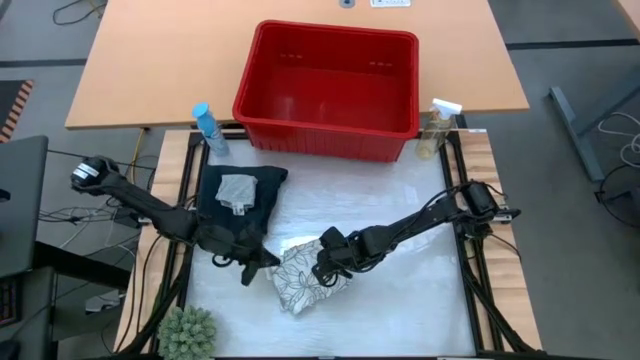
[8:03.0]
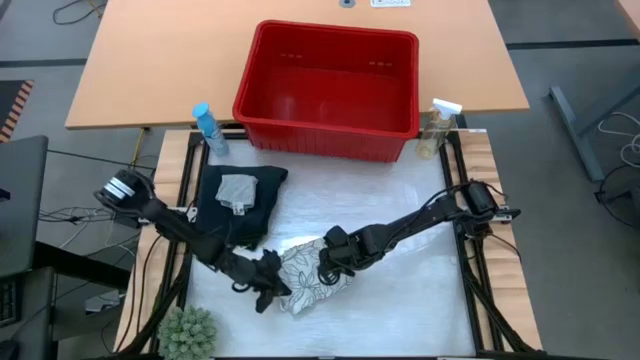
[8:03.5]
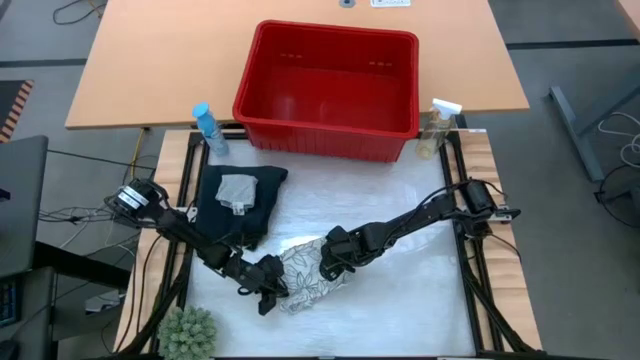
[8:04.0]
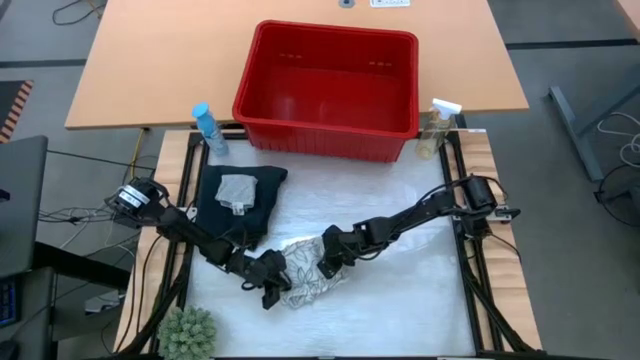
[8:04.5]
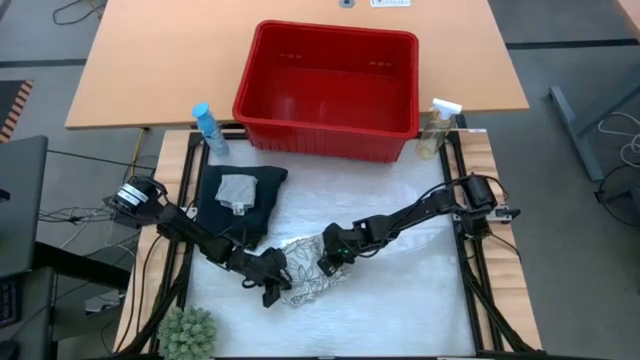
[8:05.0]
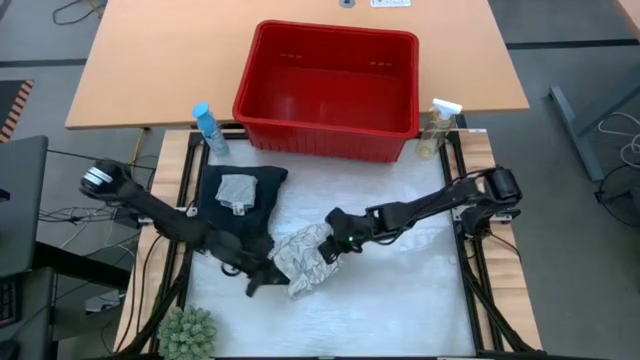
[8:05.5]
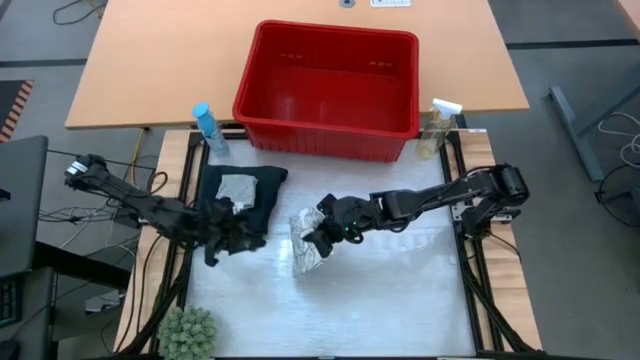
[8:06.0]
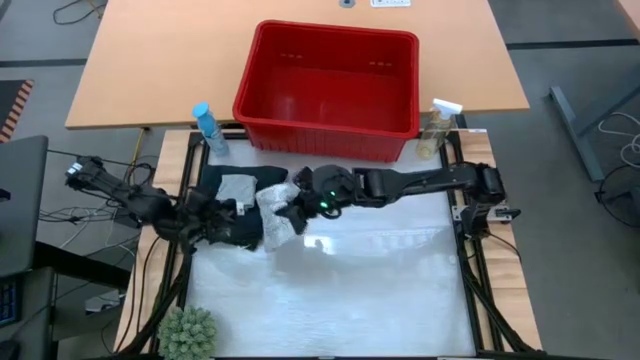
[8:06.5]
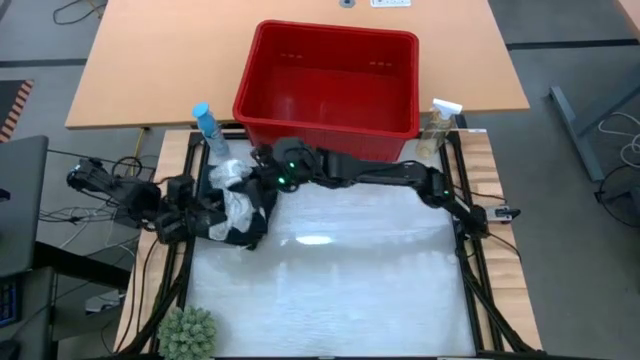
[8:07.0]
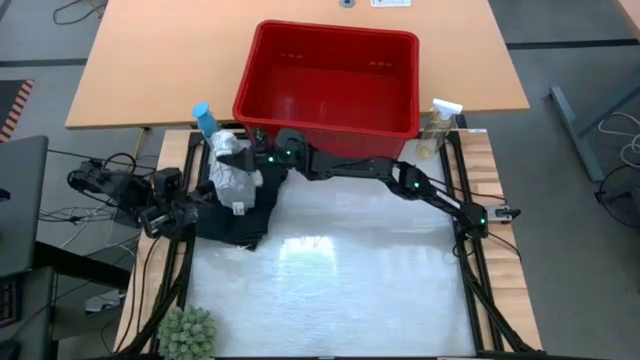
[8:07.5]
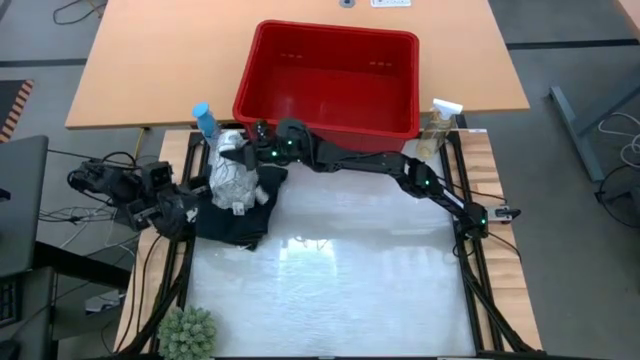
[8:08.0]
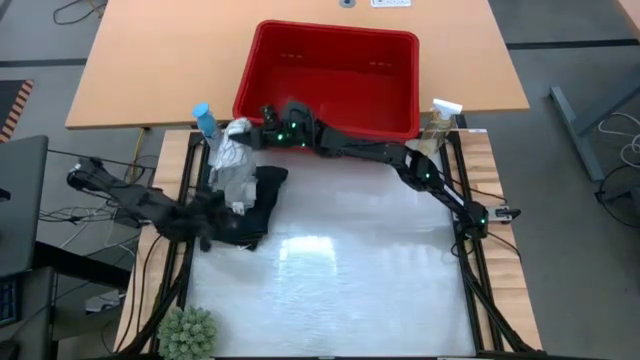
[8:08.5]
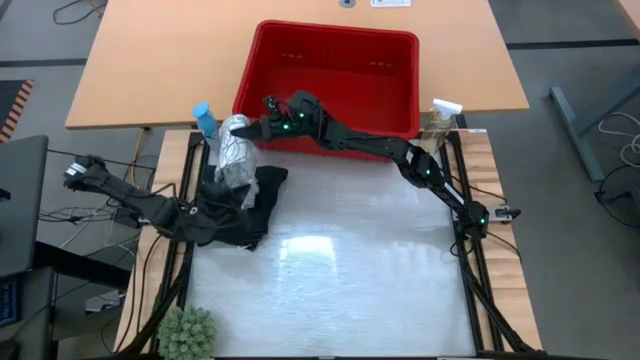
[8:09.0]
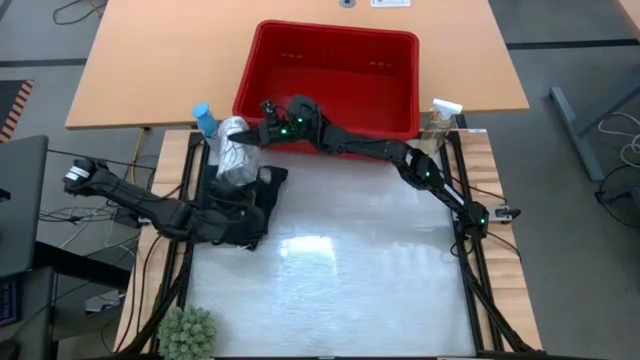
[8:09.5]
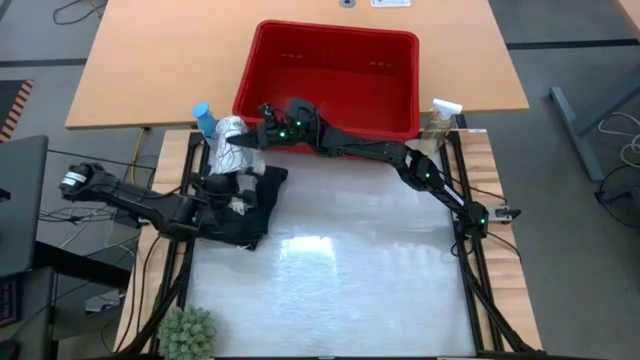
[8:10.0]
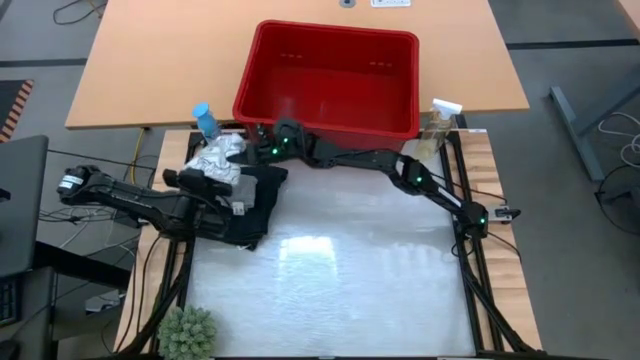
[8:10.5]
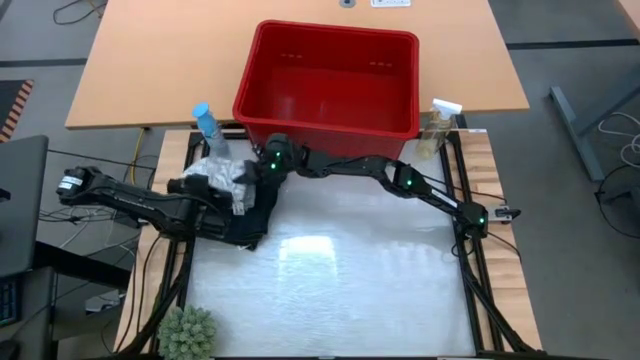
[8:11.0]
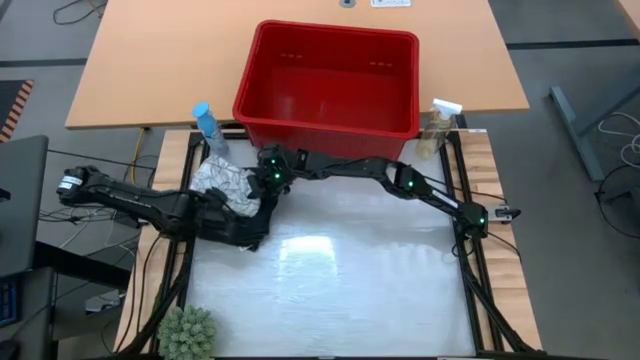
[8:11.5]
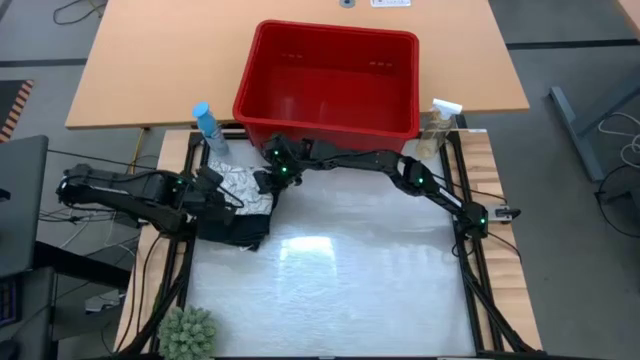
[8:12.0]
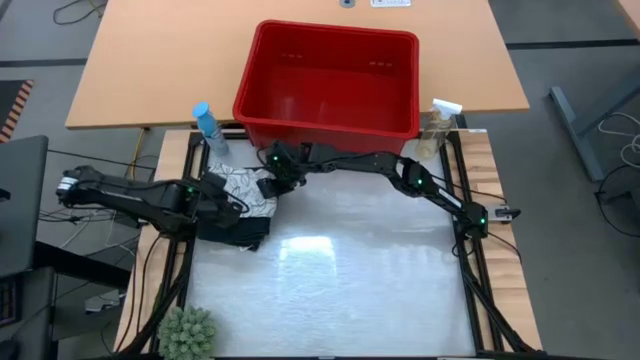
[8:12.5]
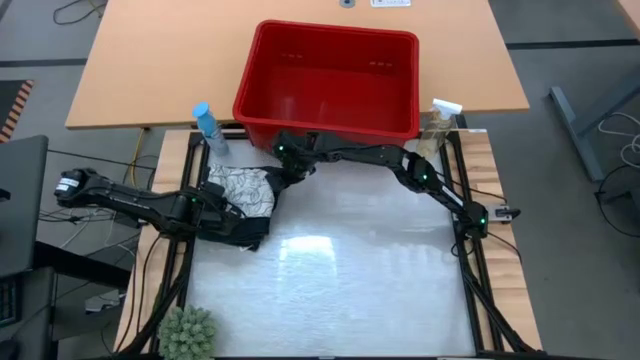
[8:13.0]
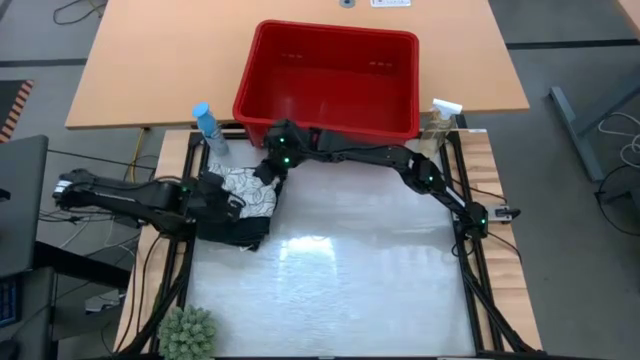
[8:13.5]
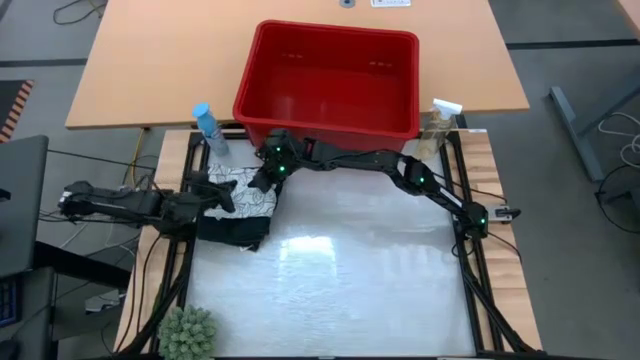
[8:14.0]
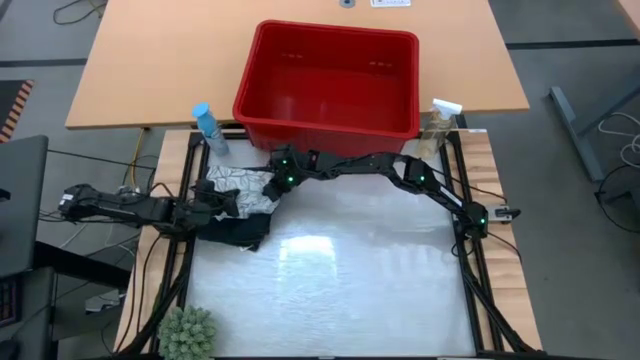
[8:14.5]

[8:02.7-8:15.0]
Task: Fold Laundry from Bin
Stack the white patterned shirts on top of the gray pants

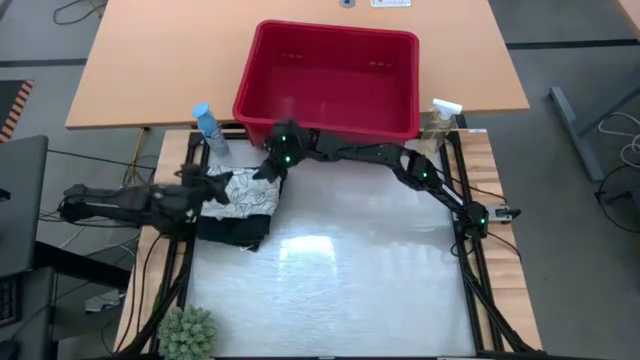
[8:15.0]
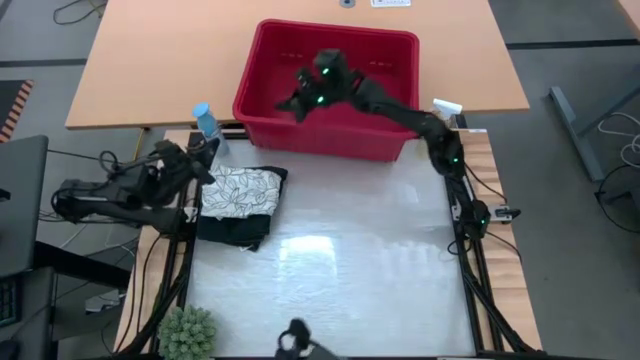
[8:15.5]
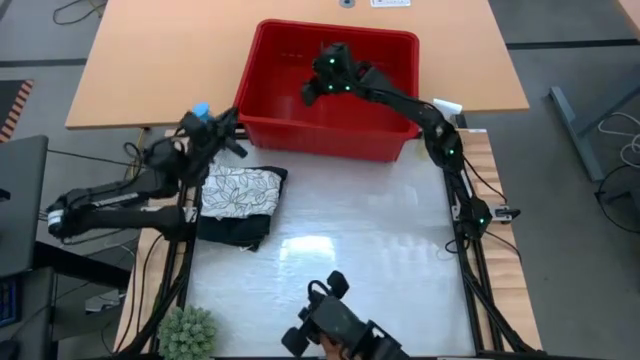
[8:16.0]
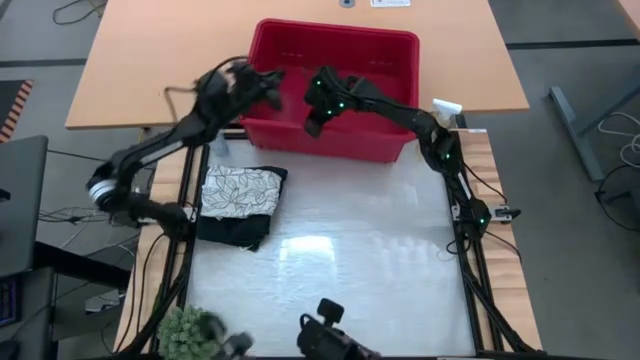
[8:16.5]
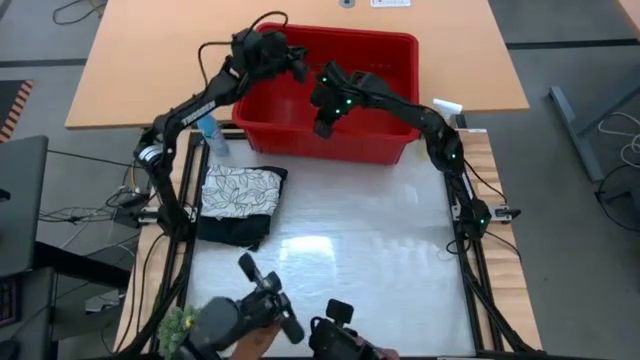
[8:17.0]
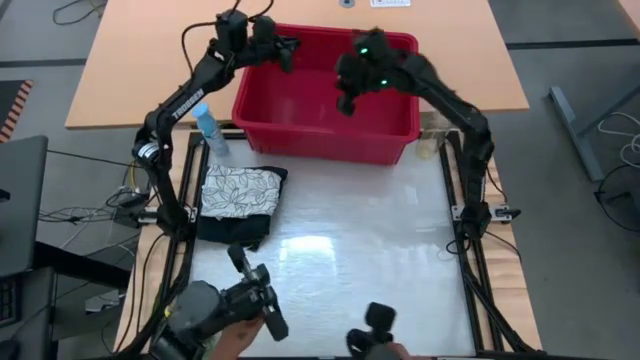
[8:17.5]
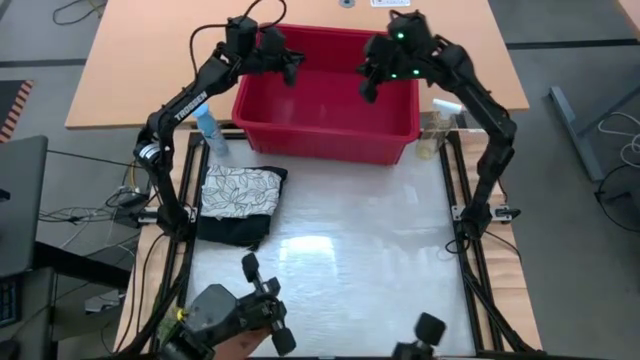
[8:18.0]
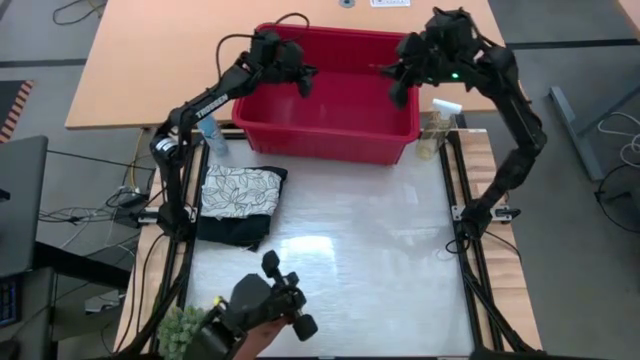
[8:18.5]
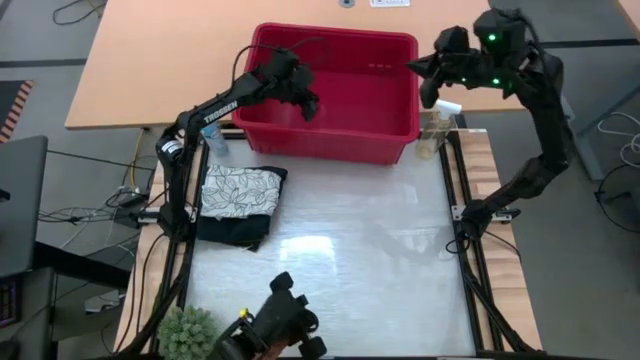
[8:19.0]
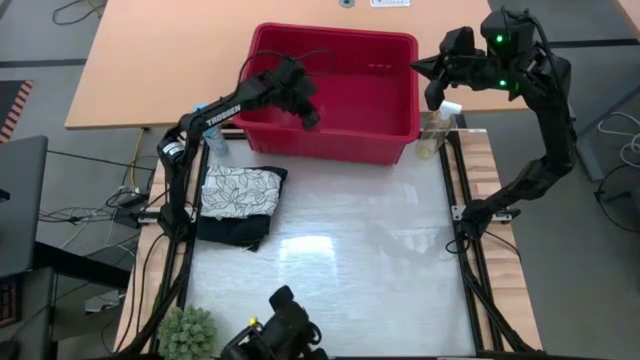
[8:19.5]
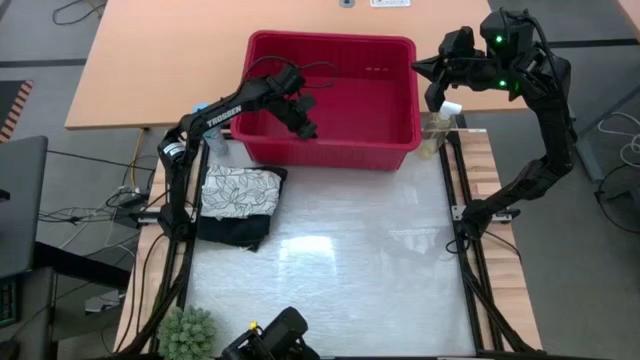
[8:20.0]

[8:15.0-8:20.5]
Adjust the red laundry bin
